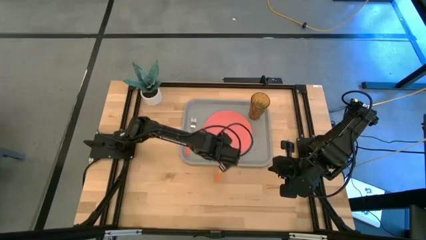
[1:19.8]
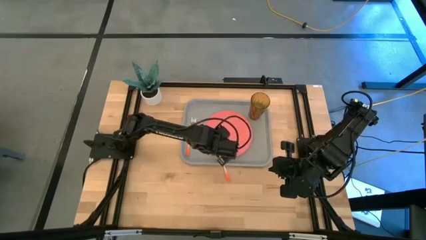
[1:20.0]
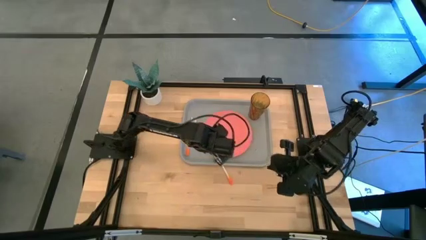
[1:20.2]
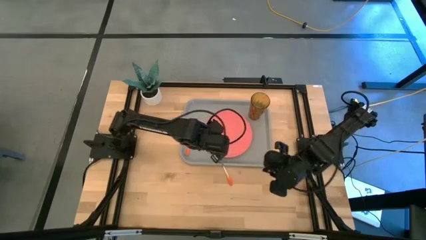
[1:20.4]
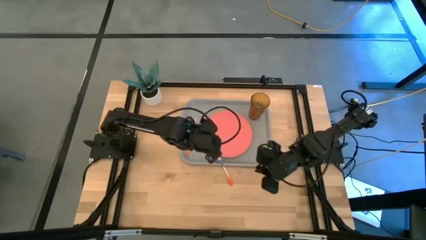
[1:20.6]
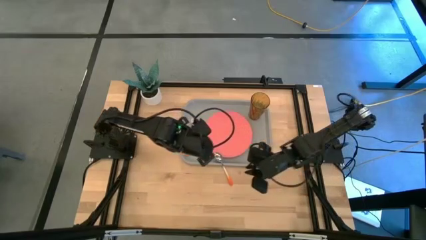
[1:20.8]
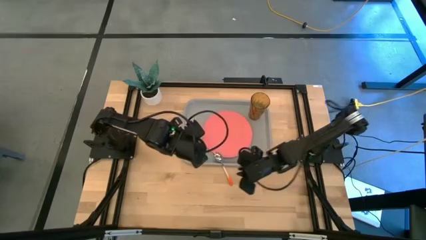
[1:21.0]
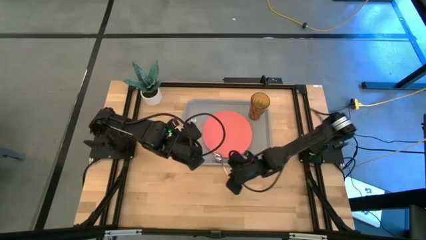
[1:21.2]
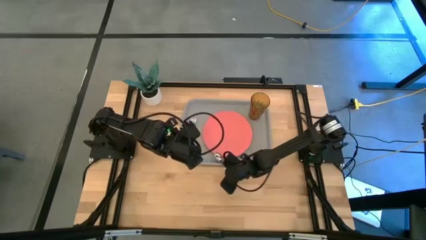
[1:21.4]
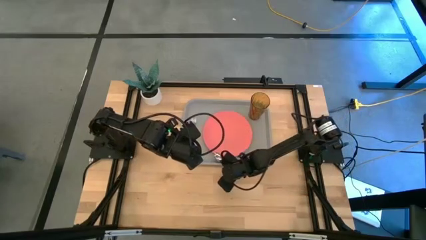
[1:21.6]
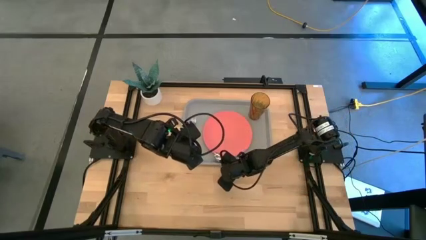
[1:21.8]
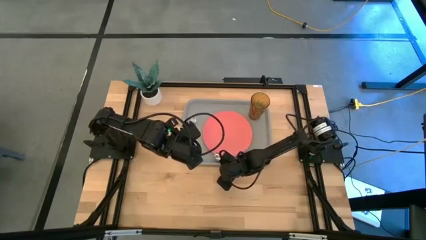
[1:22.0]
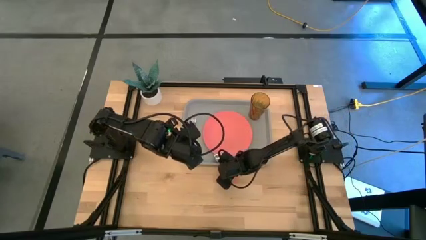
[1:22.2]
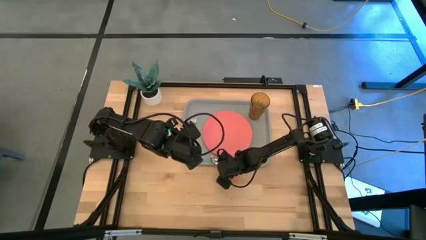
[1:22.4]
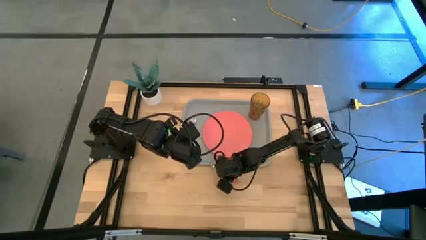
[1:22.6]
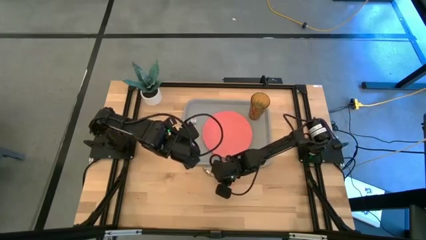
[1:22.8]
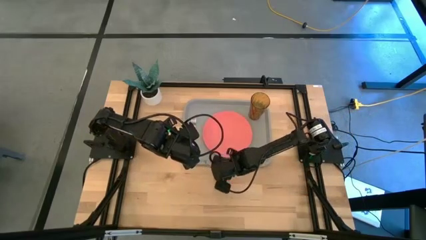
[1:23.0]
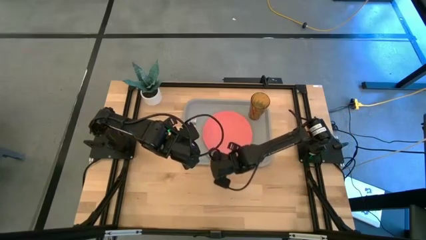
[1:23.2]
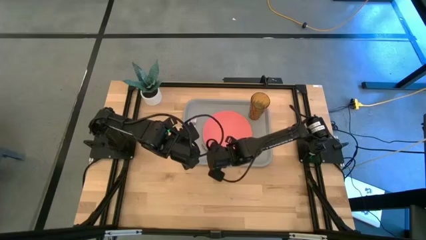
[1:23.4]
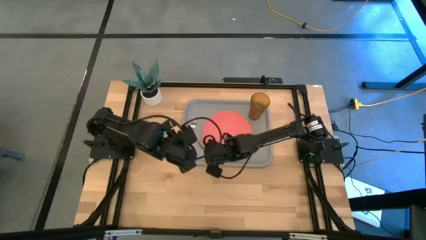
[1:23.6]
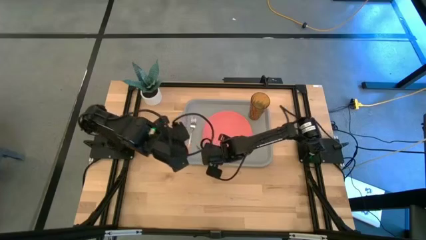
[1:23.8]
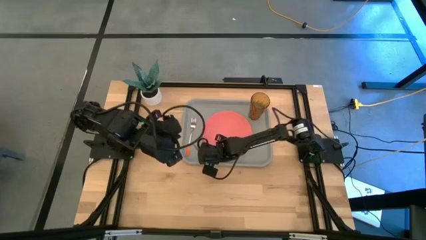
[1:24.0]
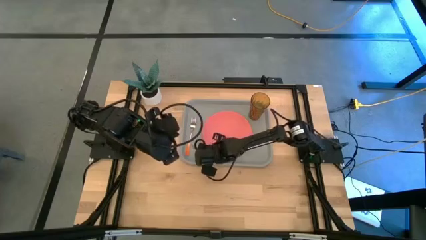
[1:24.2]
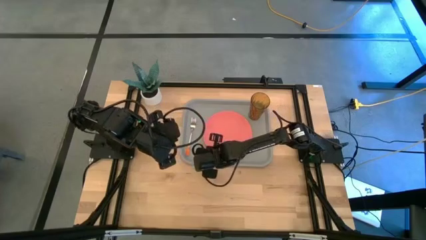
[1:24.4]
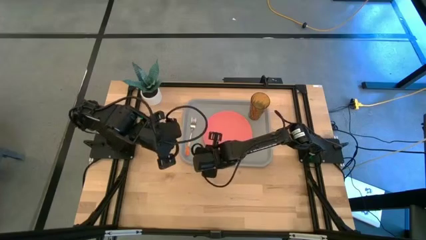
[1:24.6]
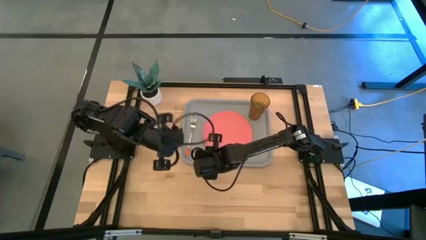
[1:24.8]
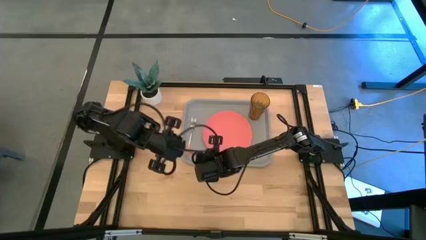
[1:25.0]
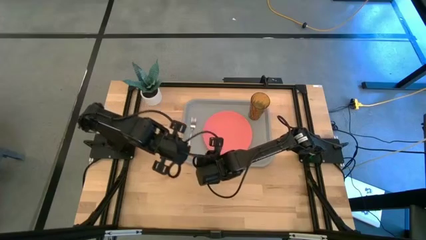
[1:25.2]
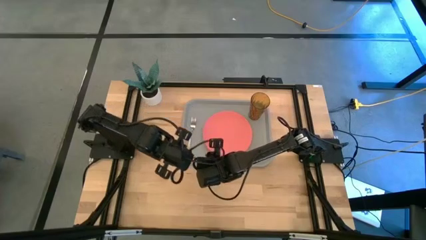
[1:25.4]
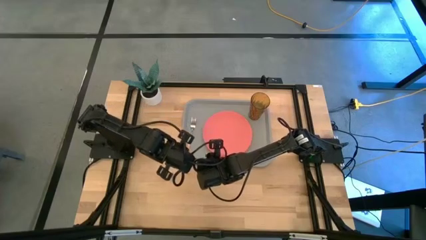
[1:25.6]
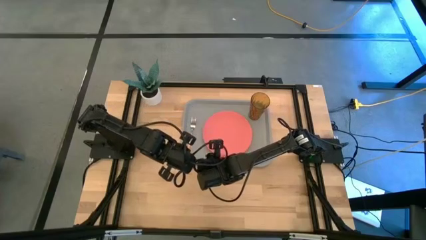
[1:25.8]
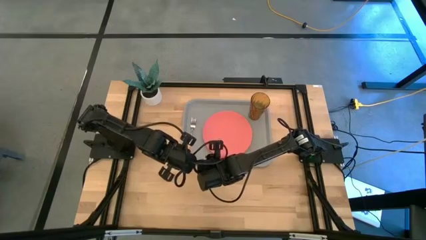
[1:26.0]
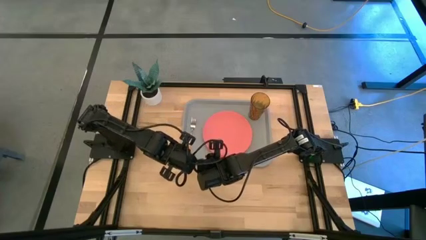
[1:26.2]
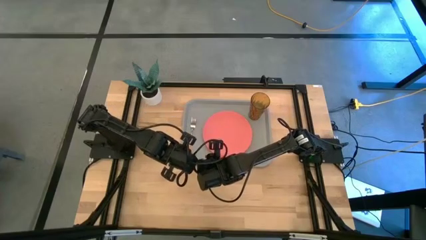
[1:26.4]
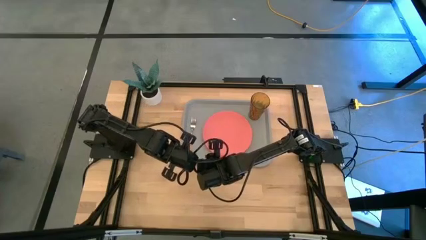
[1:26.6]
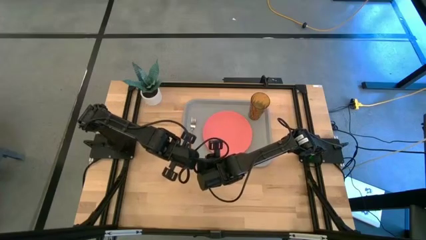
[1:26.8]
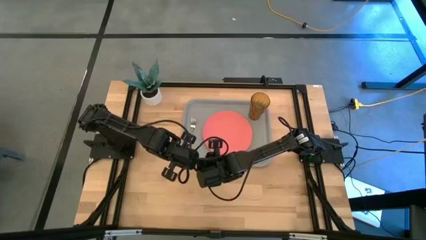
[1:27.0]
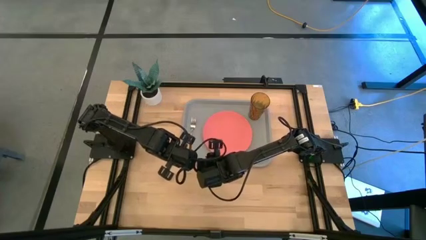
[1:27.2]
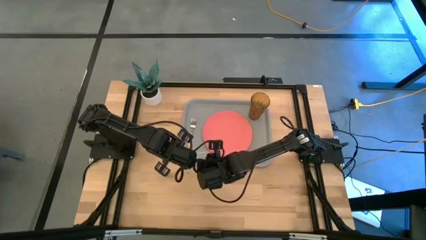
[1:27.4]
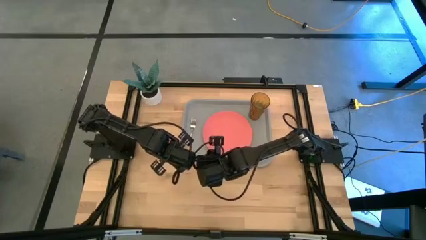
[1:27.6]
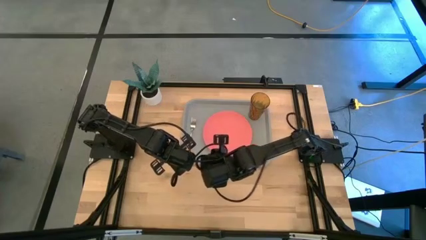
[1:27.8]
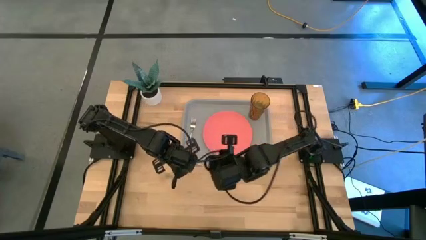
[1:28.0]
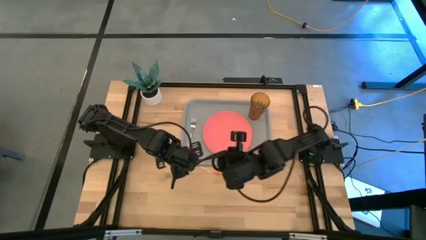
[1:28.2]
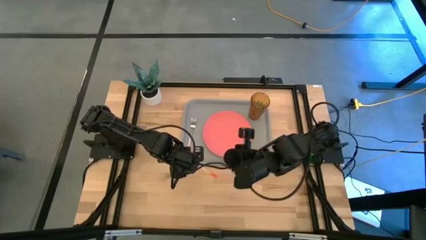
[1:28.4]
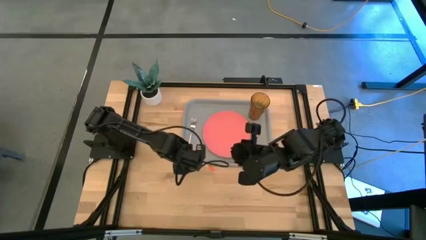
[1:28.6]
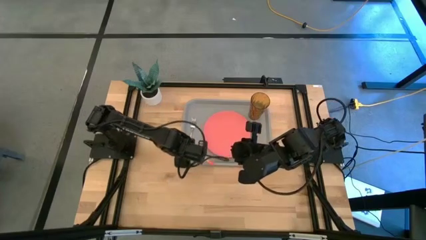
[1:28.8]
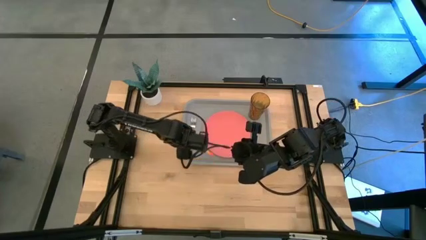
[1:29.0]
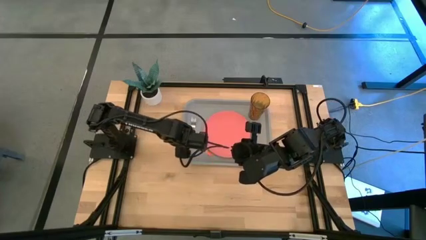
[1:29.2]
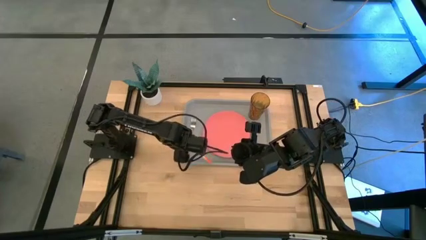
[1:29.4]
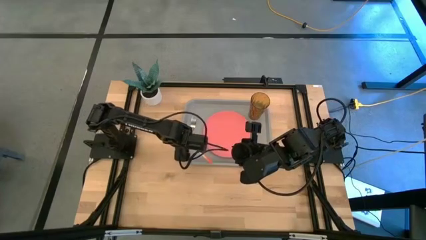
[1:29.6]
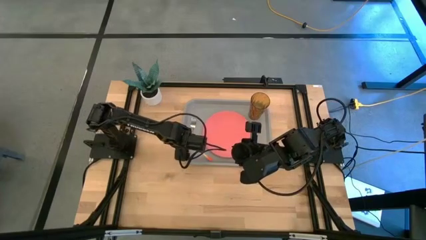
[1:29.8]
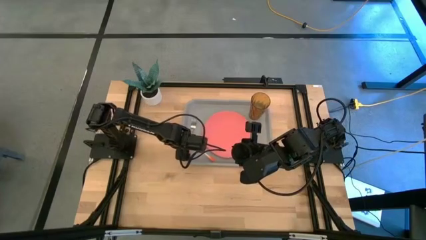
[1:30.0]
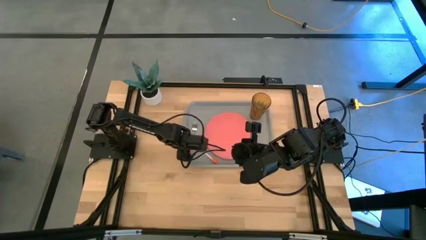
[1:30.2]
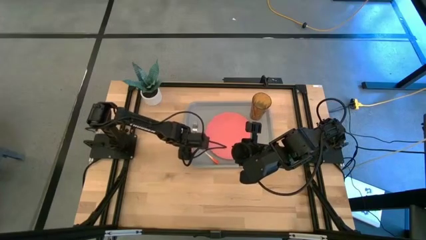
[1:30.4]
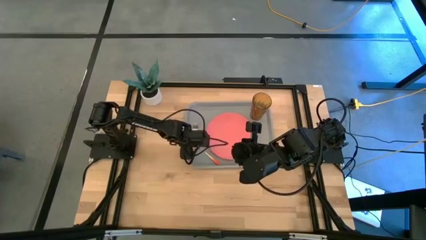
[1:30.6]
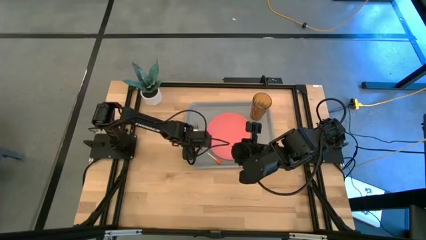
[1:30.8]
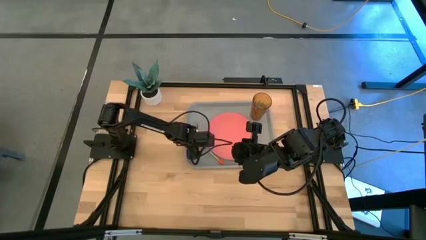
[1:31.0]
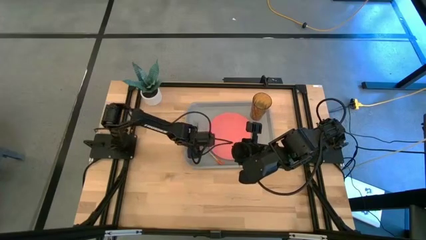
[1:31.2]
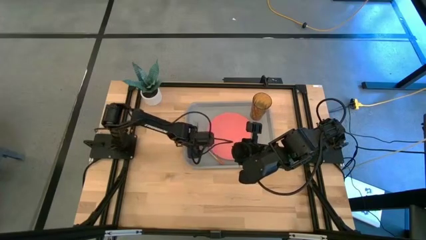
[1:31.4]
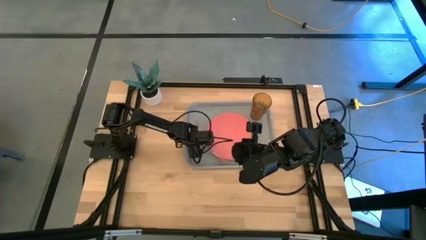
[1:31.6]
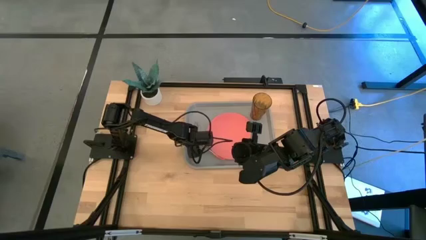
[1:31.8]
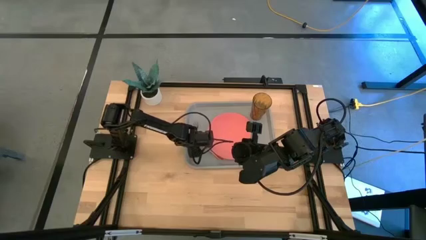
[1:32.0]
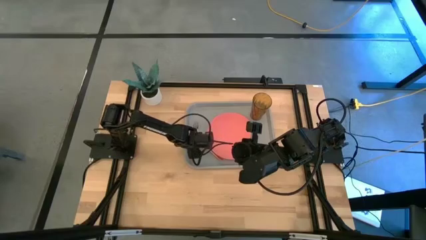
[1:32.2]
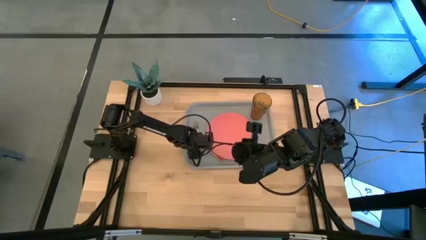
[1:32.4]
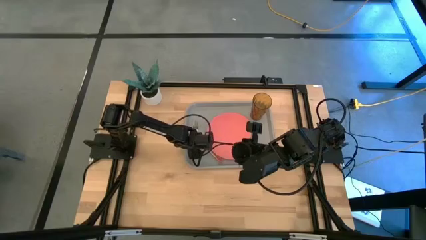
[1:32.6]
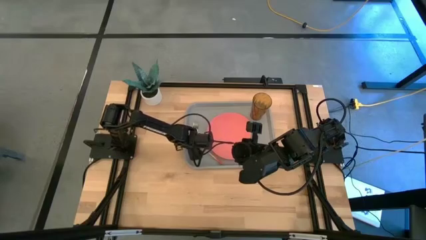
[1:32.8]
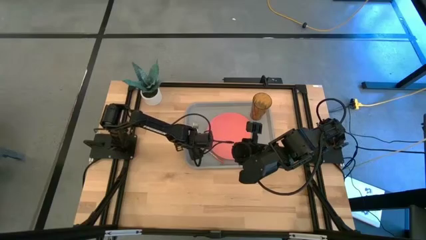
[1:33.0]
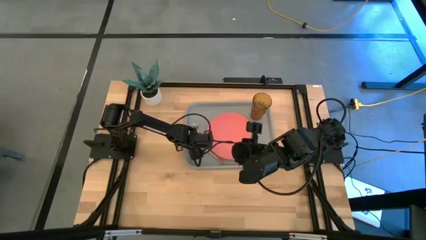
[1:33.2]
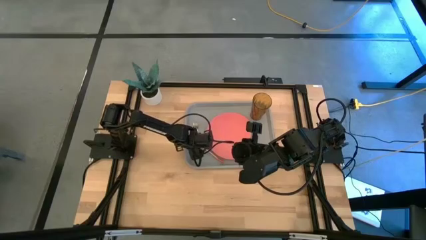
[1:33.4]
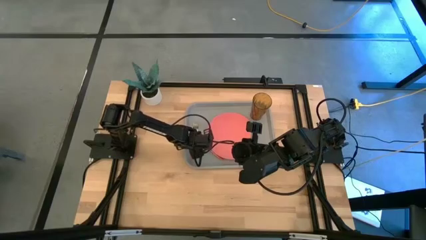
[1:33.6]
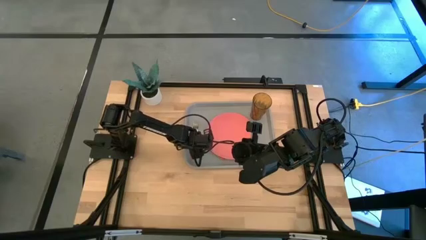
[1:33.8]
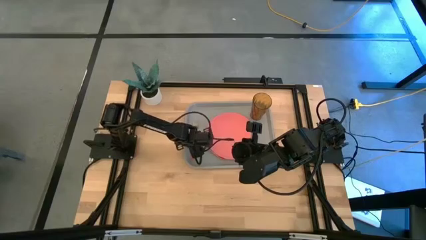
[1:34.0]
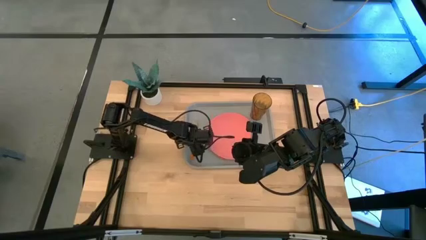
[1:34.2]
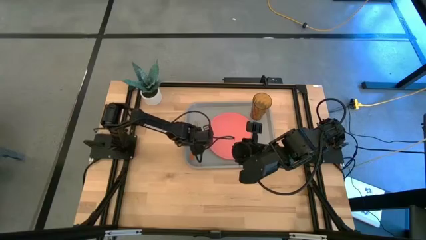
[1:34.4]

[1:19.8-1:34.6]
Task: Pick and place plate/cup/fork/spoon on tray
Put the orange spoon on the right side of the orange fork on the gray serving tray

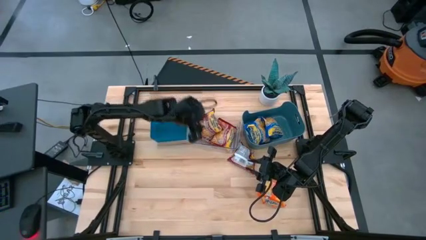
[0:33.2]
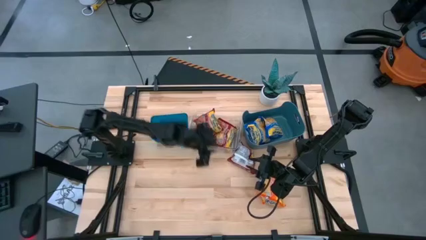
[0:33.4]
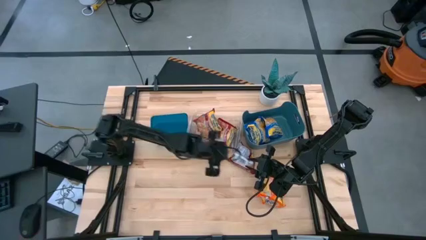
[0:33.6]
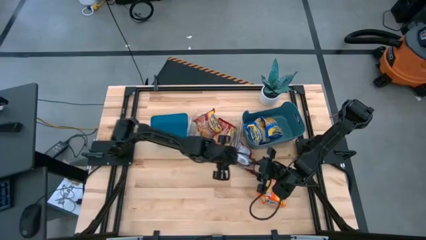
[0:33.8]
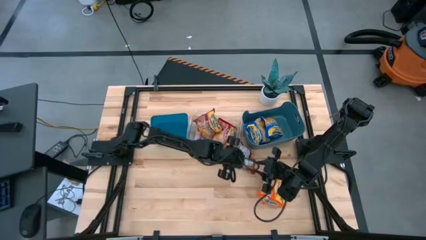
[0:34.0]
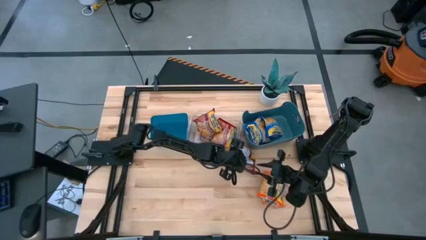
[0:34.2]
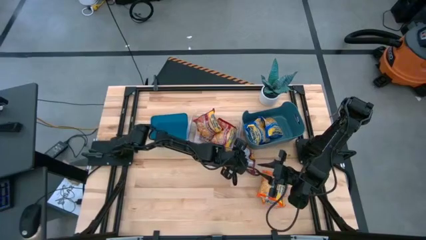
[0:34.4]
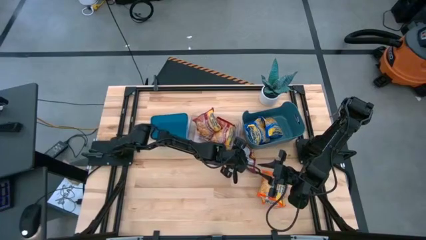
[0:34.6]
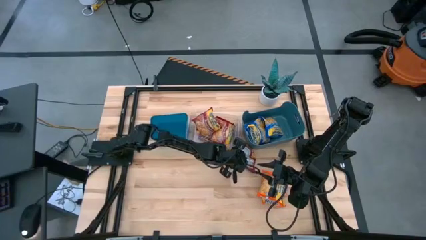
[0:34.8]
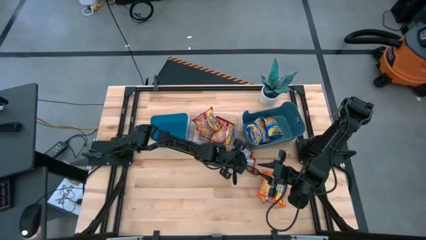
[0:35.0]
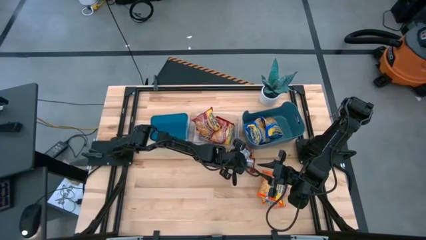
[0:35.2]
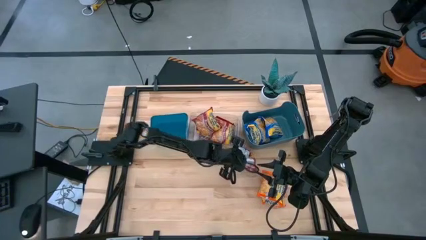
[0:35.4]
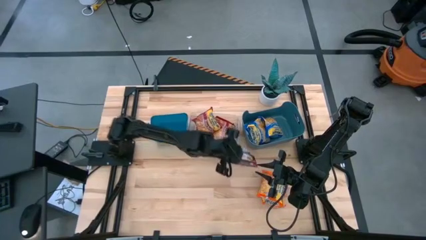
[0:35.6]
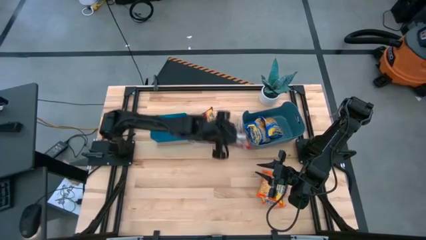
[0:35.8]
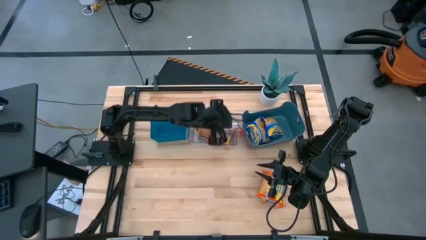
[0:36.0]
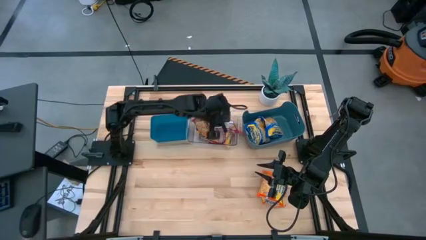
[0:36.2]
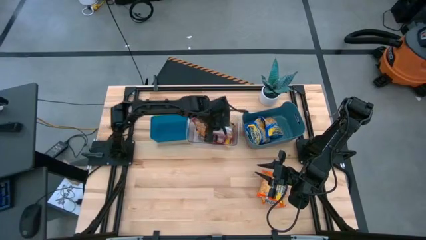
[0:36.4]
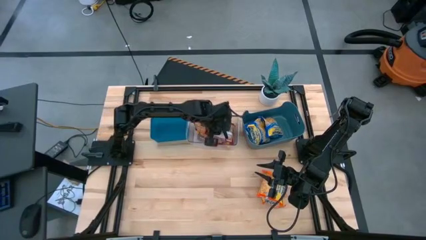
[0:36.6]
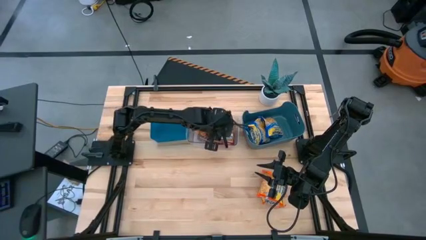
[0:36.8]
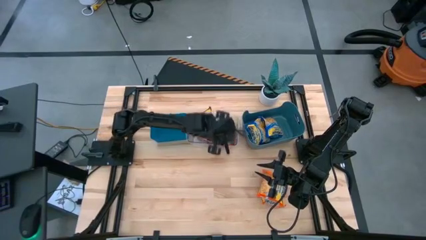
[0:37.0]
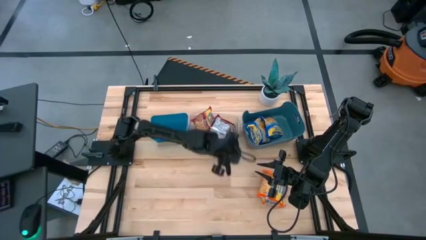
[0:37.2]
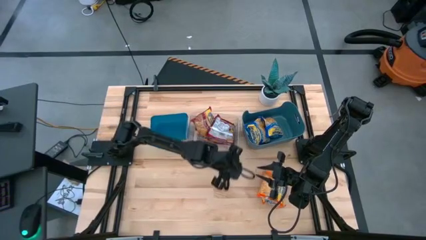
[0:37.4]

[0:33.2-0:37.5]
Task: Sort Maruchan noodles
Put the red noodle pack into the transparent bin
